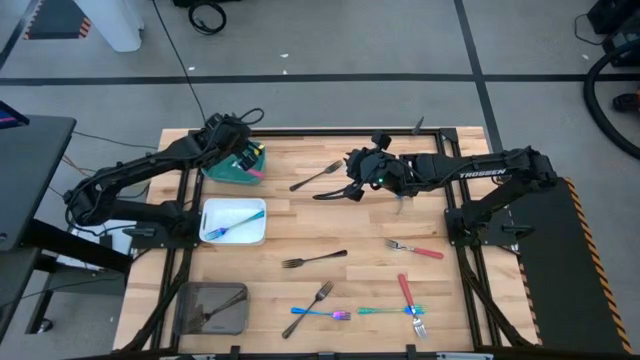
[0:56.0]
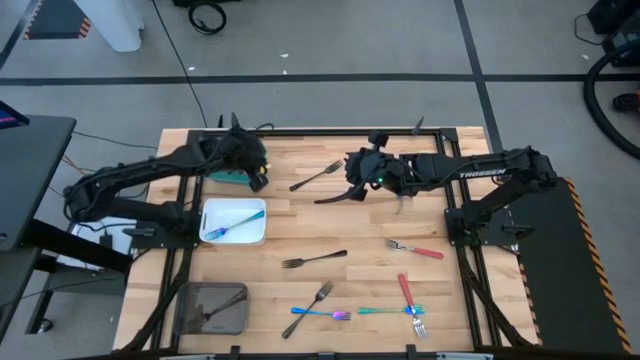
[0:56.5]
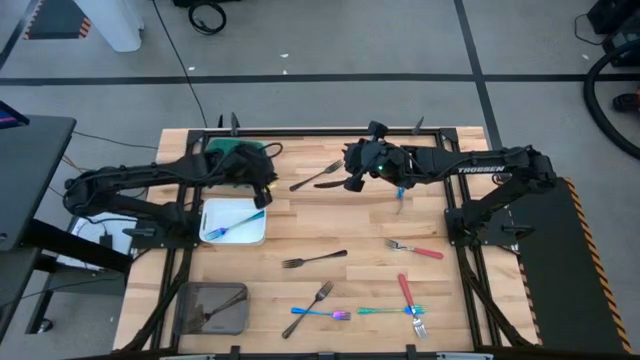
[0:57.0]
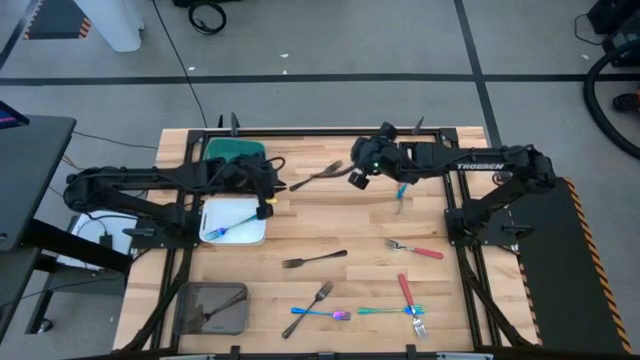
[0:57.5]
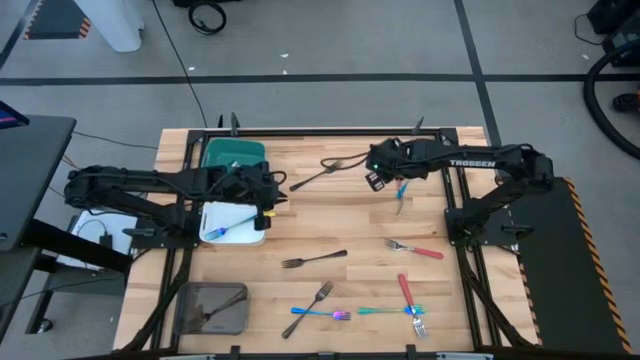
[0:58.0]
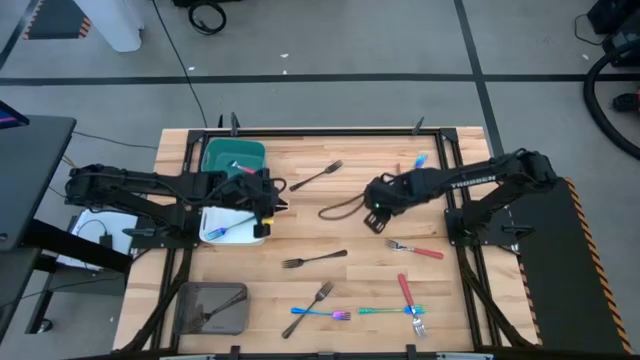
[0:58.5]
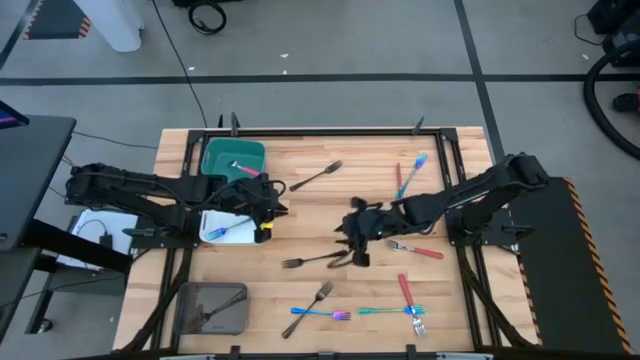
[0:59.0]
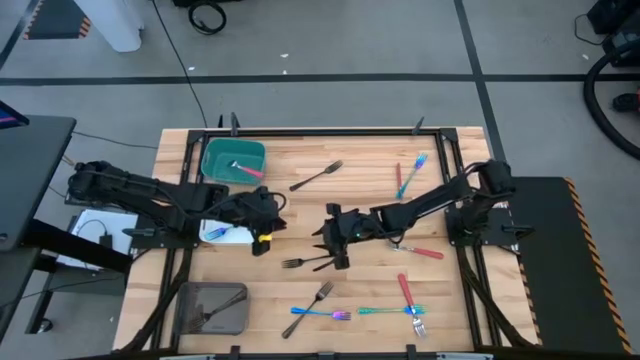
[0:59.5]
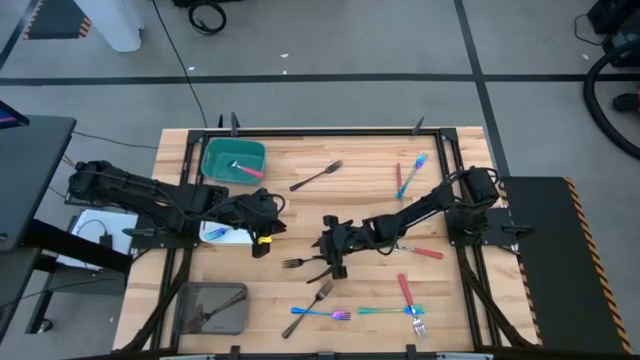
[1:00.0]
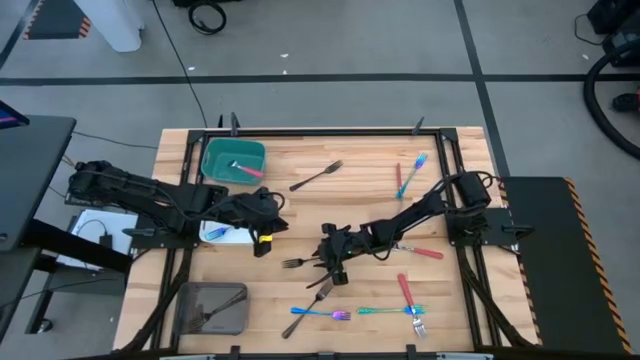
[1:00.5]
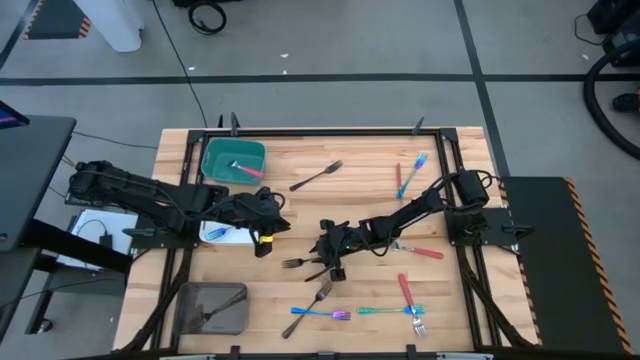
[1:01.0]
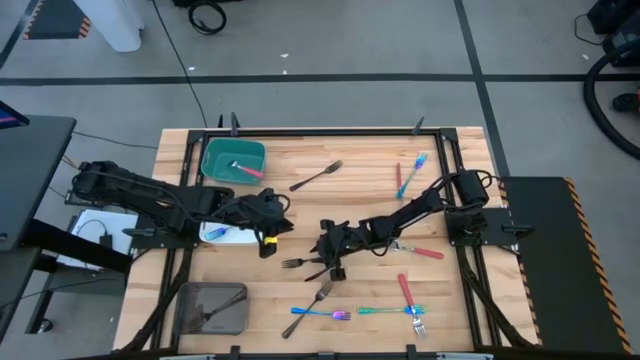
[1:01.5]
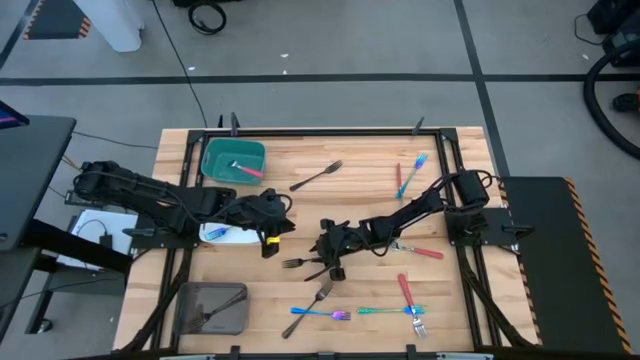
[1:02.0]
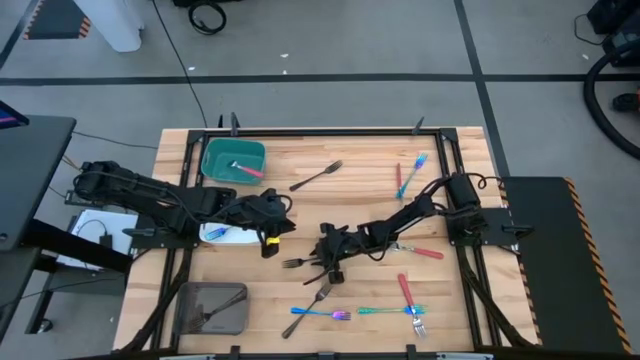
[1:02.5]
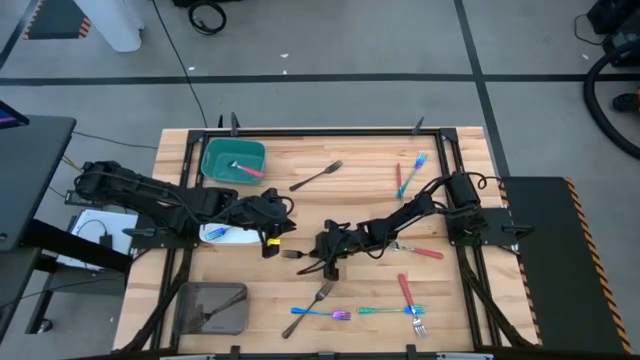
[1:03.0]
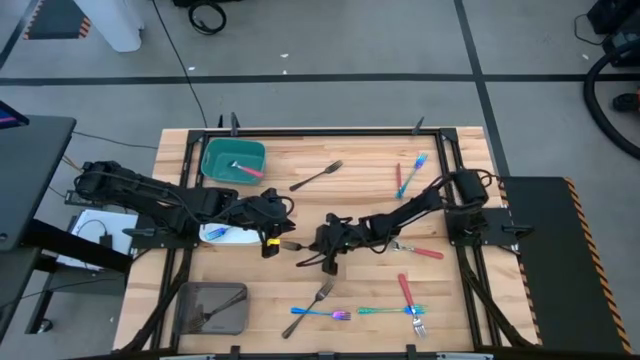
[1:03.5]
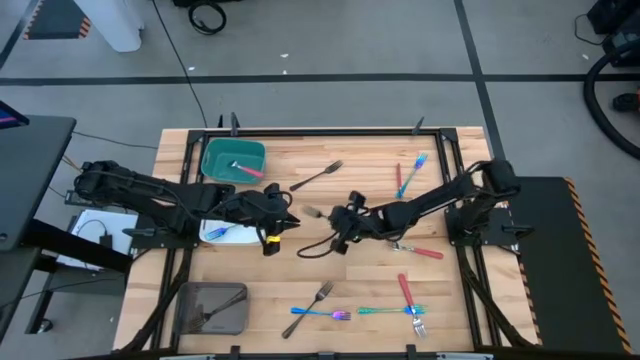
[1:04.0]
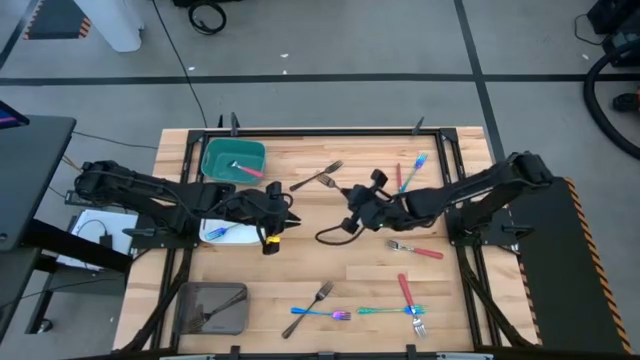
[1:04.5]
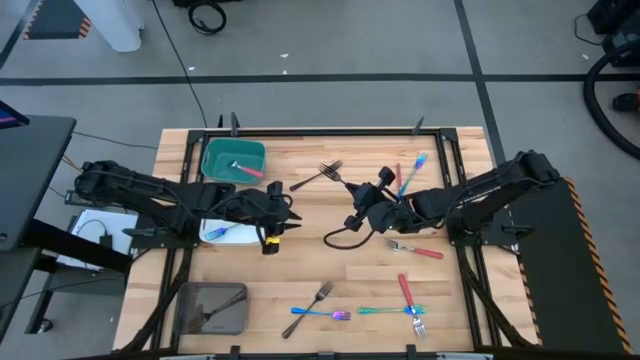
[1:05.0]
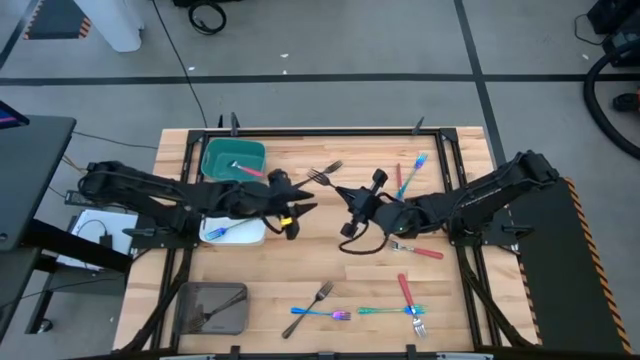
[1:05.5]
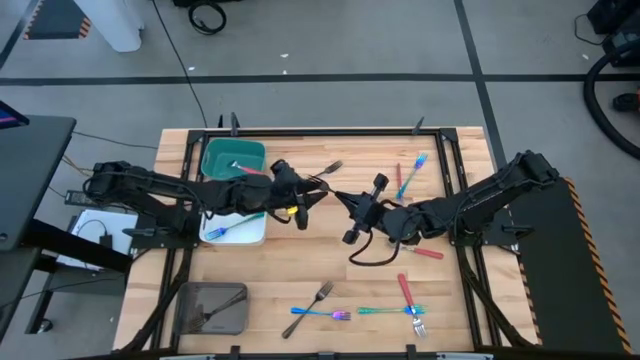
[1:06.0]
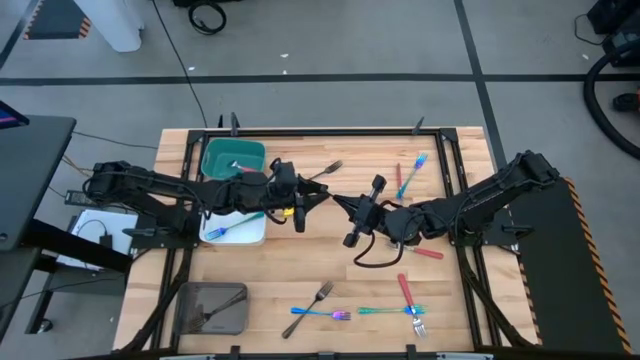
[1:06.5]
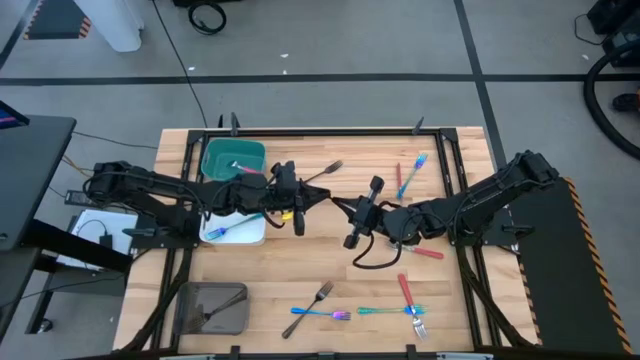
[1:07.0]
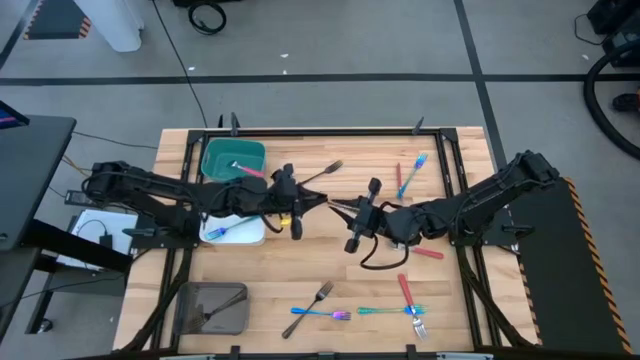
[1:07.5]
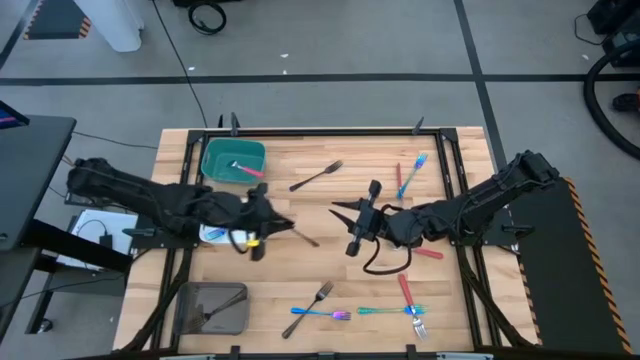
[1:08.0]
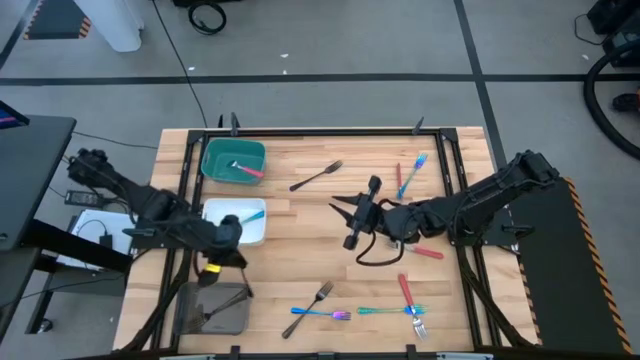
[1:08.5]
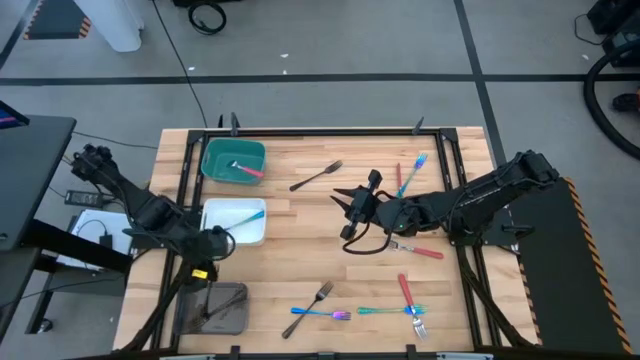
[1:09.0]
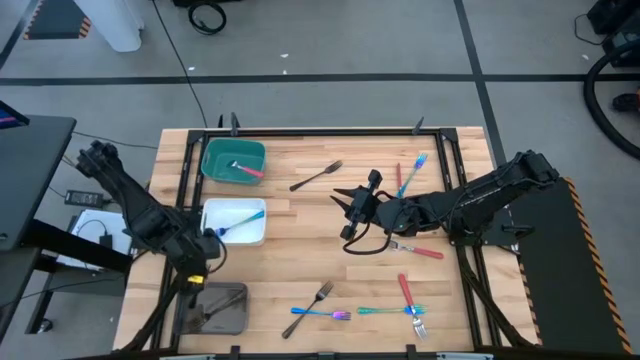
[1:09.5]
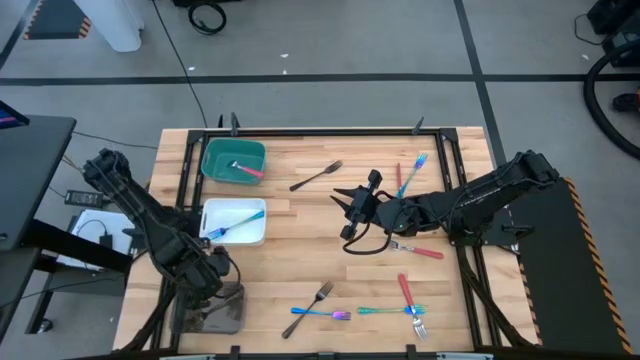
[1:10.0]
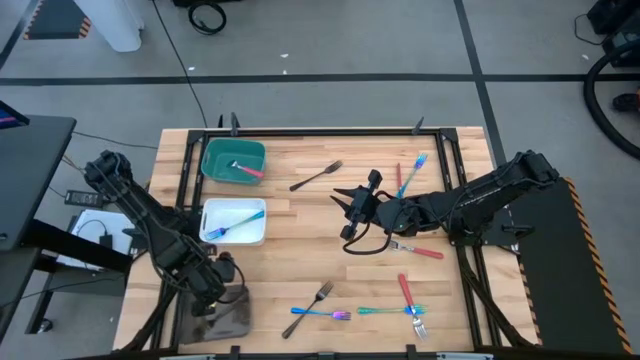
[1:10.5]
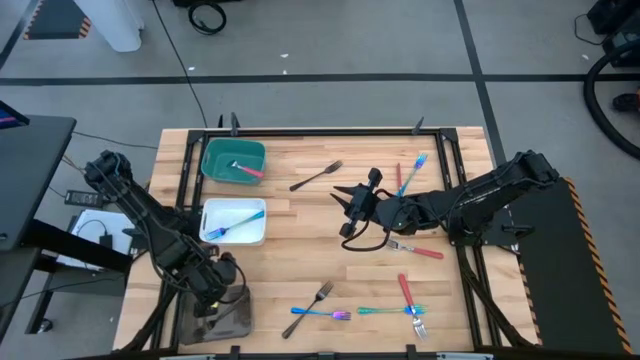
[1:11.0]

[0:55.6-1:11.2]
Task: Sort silverware by color (type)
Put the black fork into the black bin

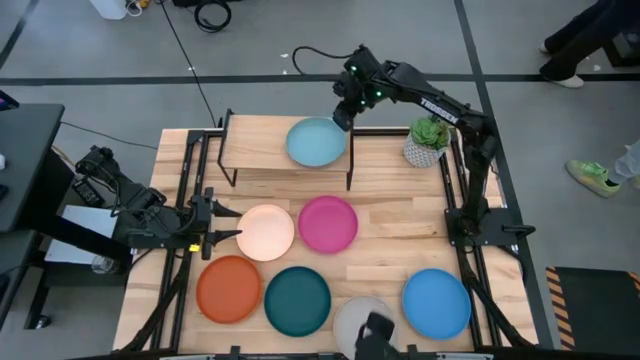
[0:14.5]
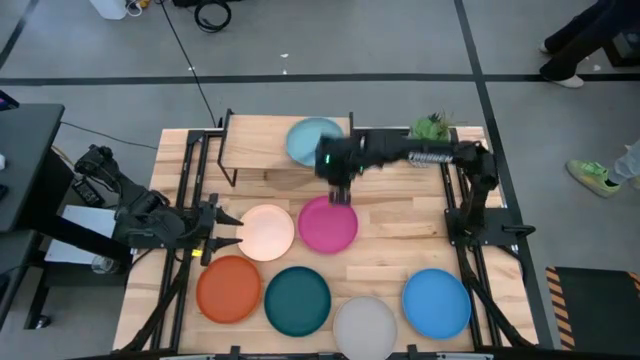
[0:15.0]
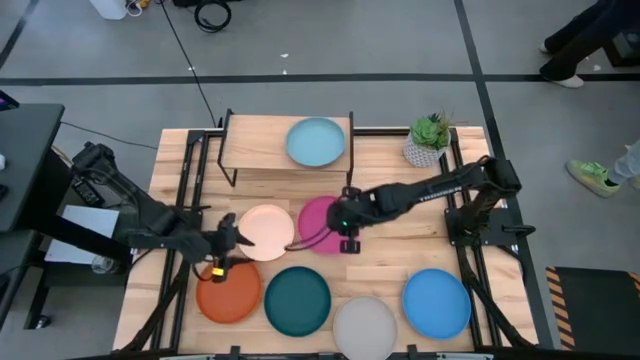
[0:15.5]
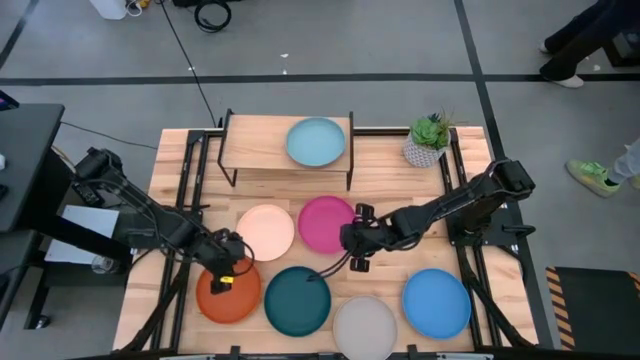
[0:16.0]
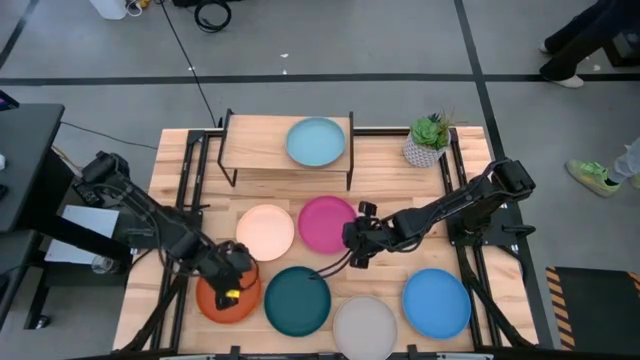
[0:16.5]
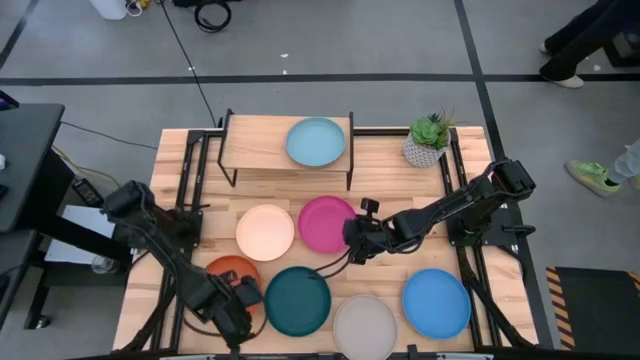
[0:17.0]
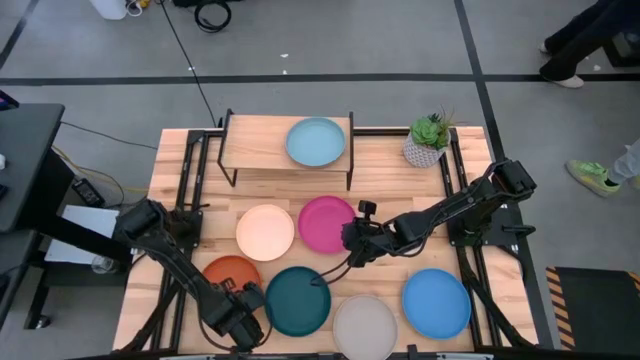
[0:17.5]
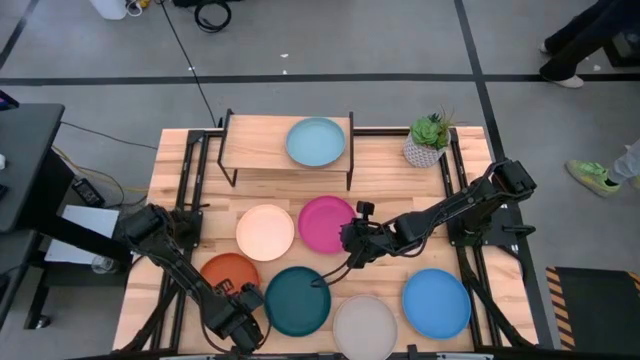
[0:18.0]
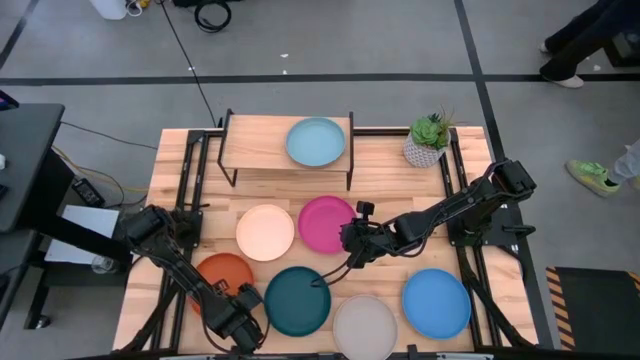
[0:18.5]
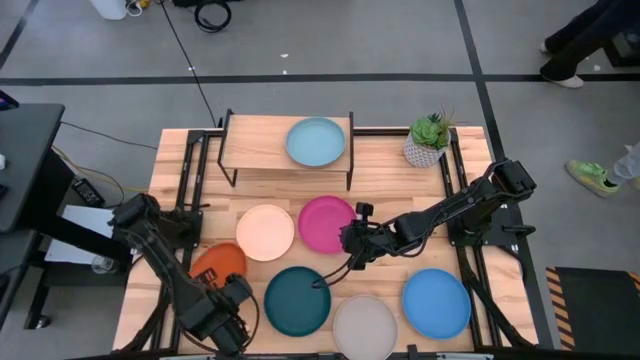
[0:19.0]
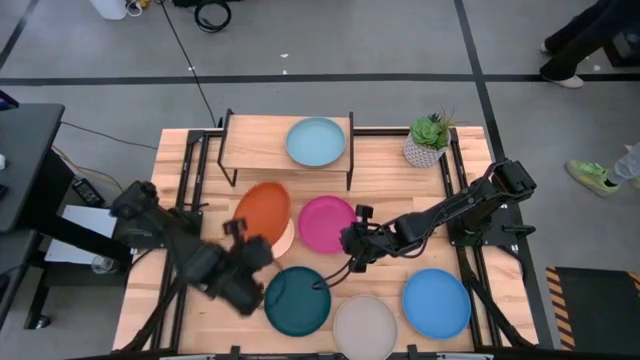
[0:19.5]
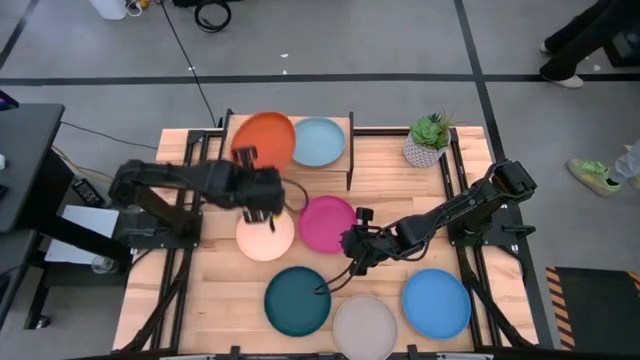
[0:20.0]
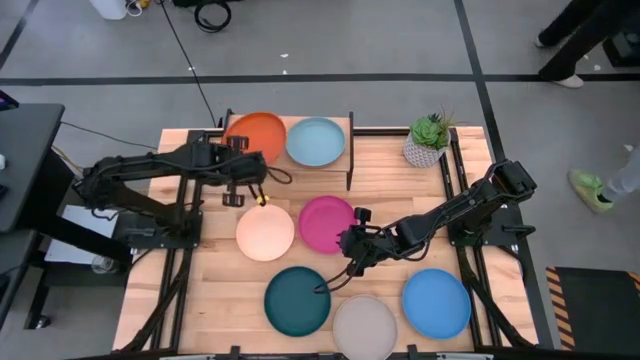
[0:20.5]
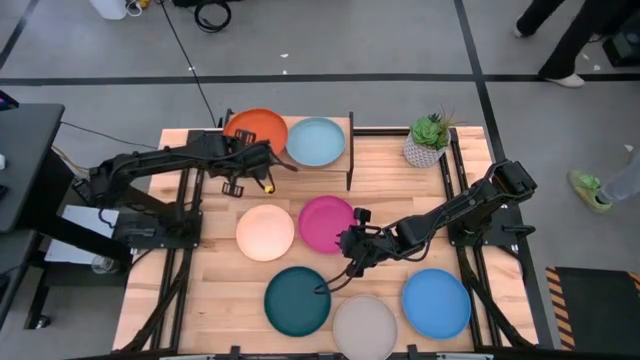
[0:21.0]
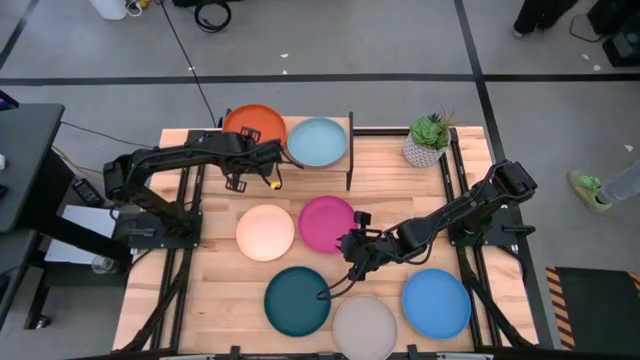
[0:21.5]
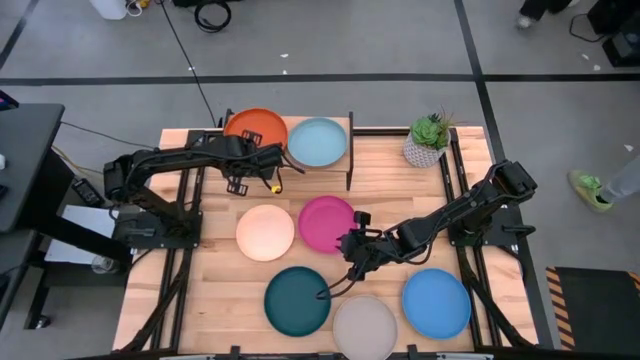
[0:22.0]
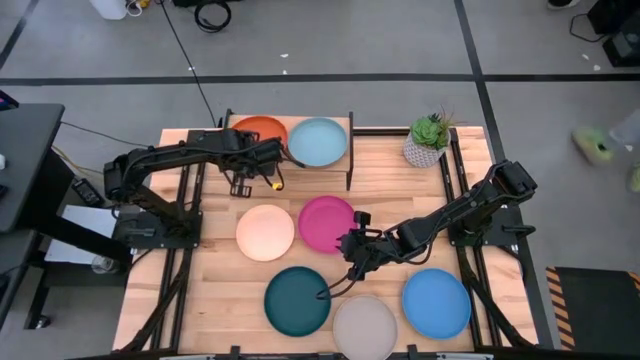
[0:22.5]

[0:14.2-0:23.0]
Task: Place and stack plates onto a shelf
Put the orange plate on the shelf
